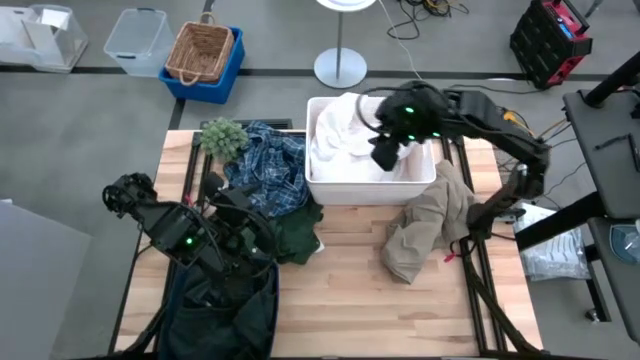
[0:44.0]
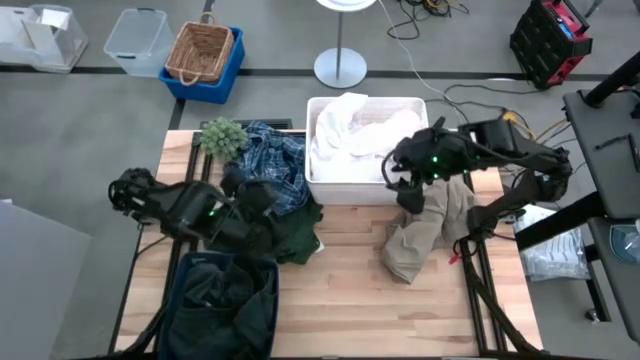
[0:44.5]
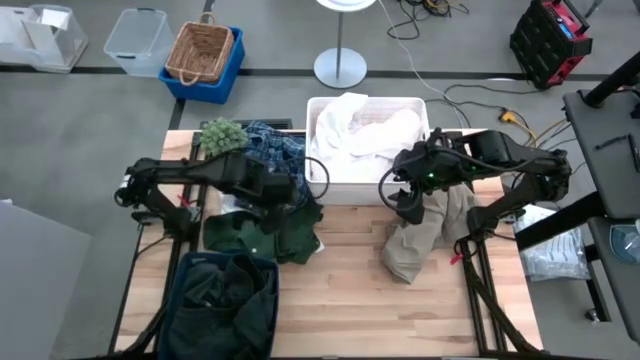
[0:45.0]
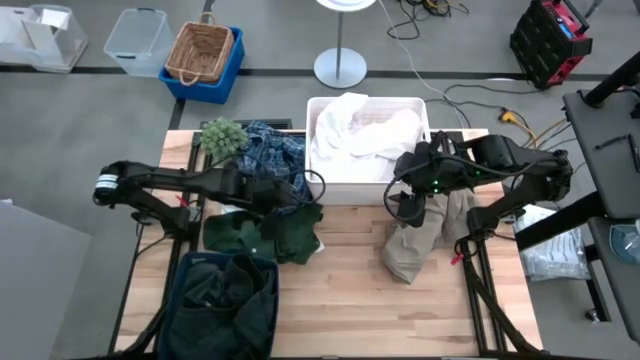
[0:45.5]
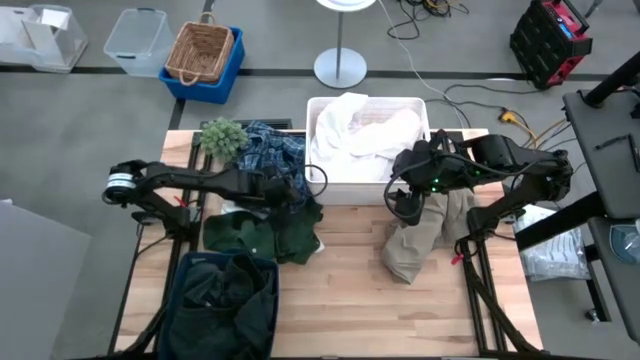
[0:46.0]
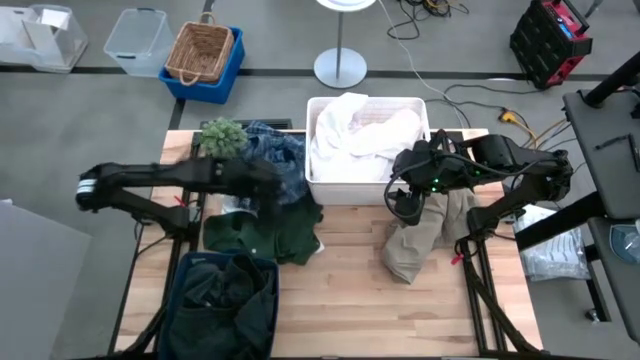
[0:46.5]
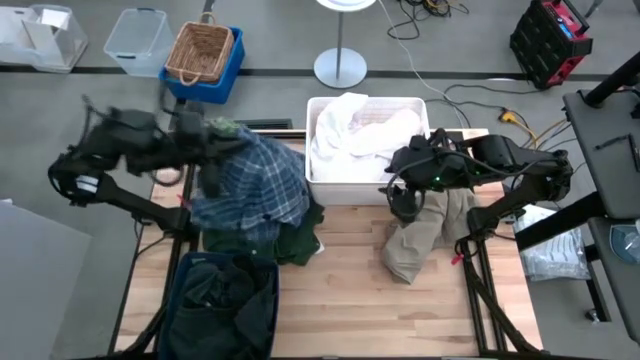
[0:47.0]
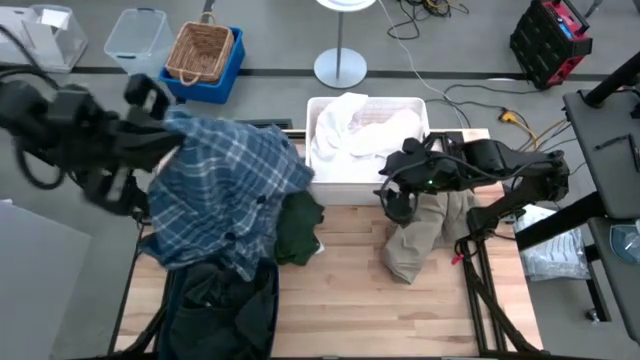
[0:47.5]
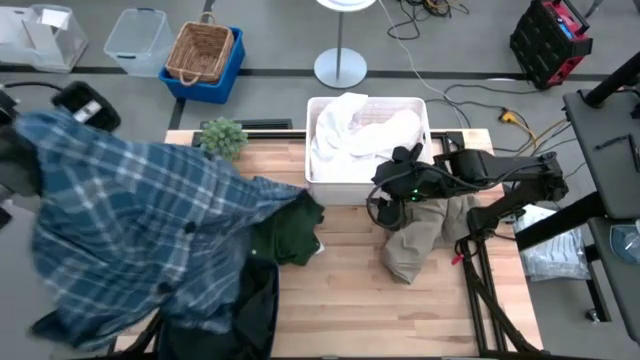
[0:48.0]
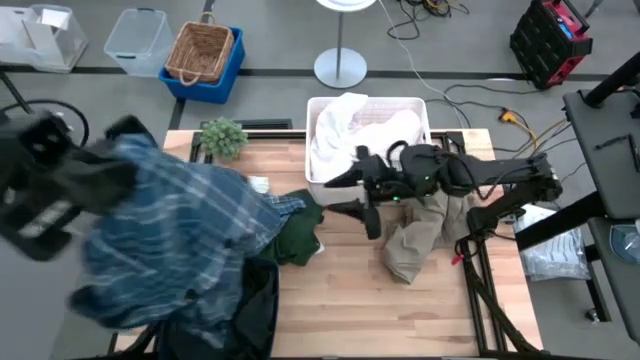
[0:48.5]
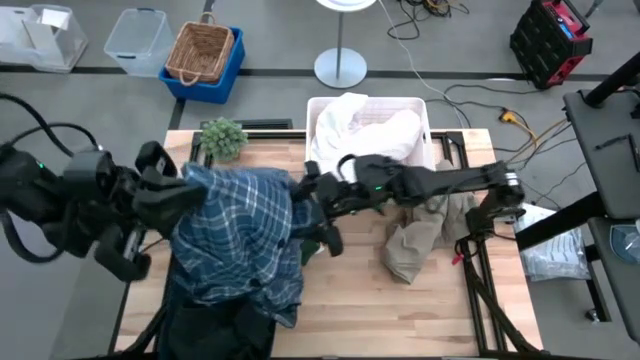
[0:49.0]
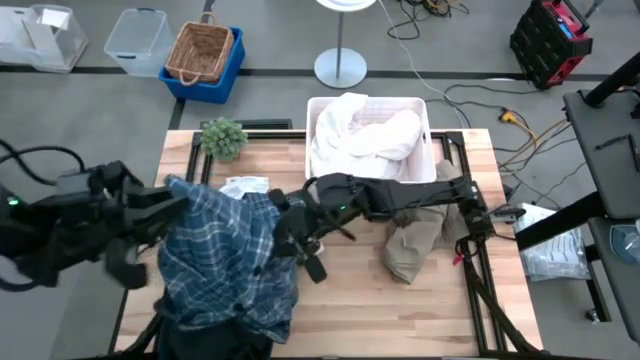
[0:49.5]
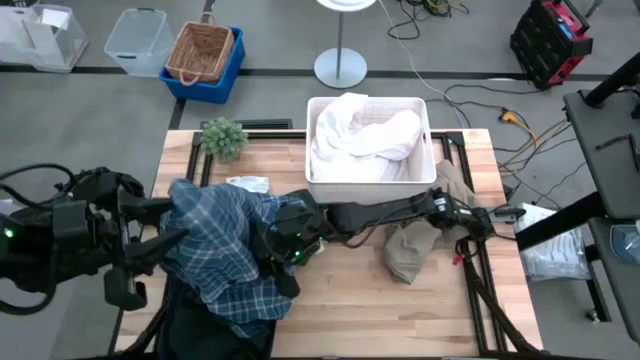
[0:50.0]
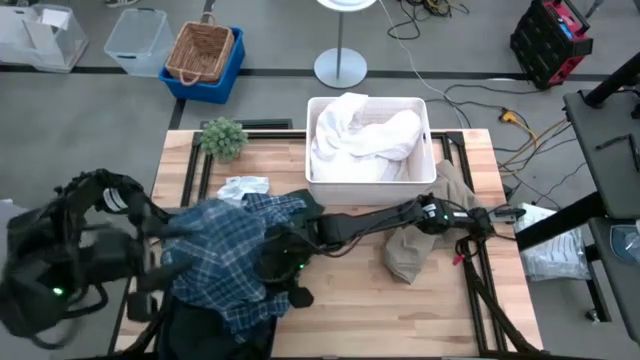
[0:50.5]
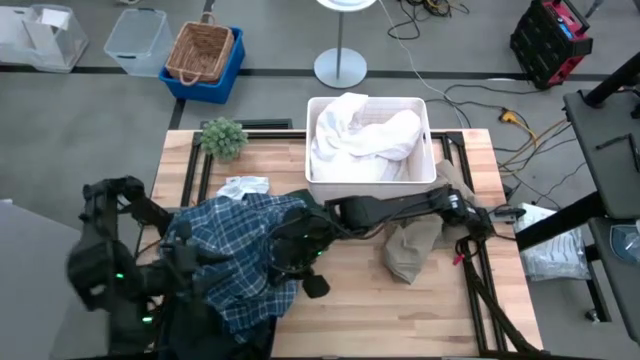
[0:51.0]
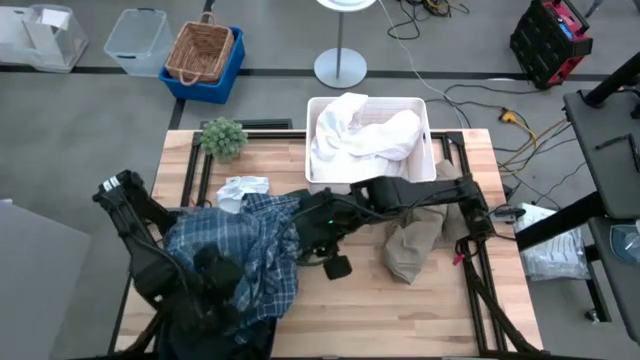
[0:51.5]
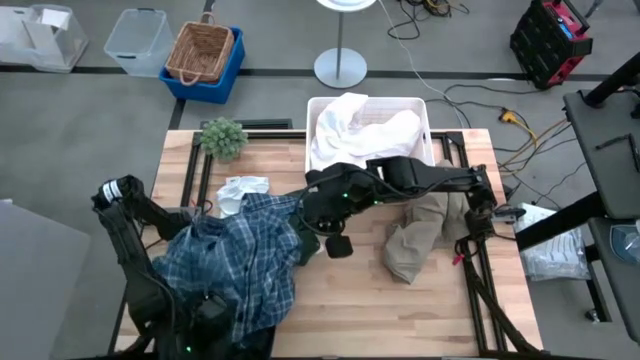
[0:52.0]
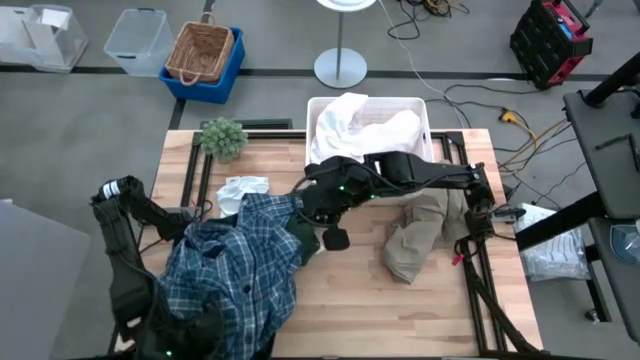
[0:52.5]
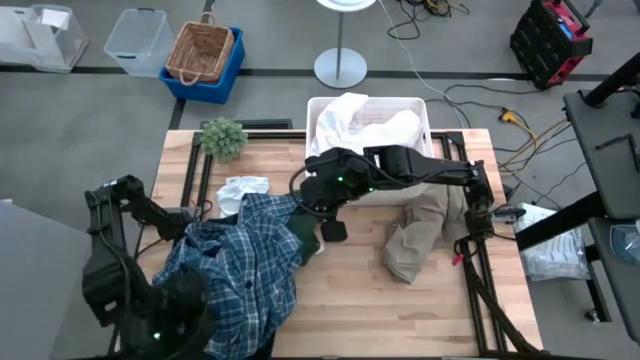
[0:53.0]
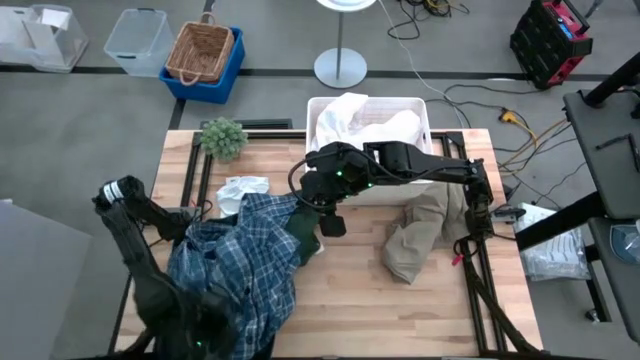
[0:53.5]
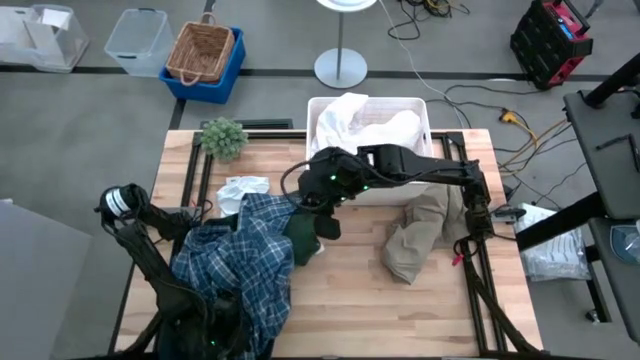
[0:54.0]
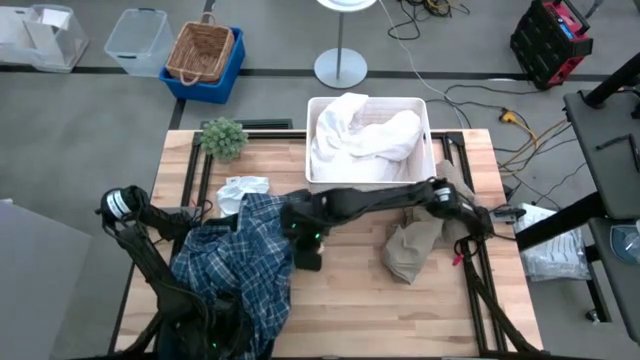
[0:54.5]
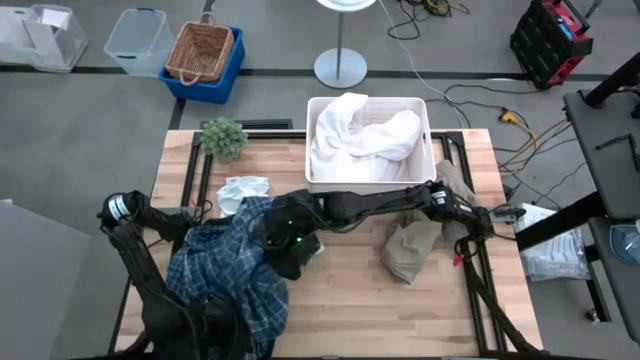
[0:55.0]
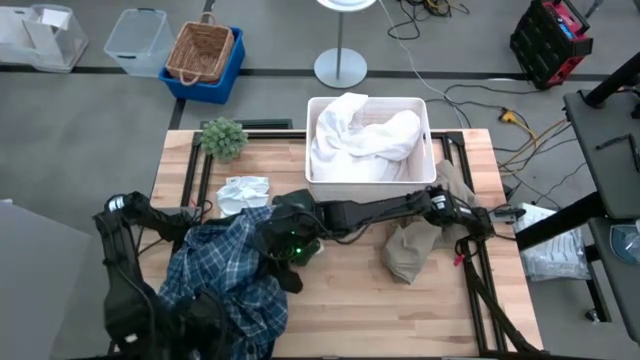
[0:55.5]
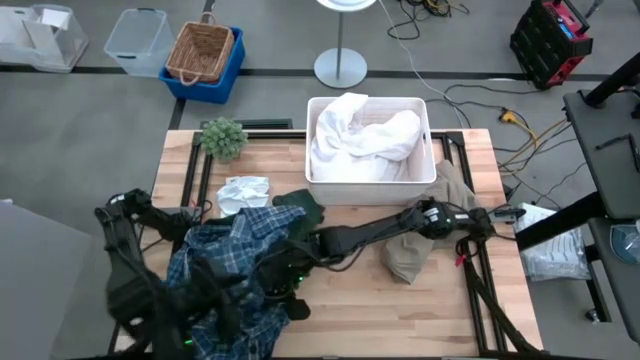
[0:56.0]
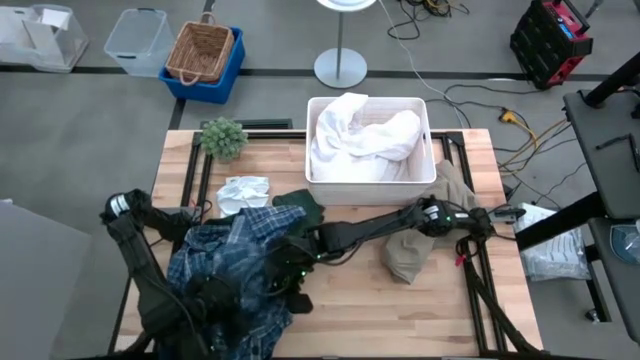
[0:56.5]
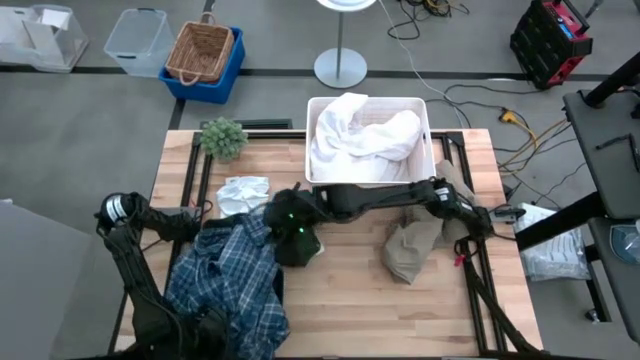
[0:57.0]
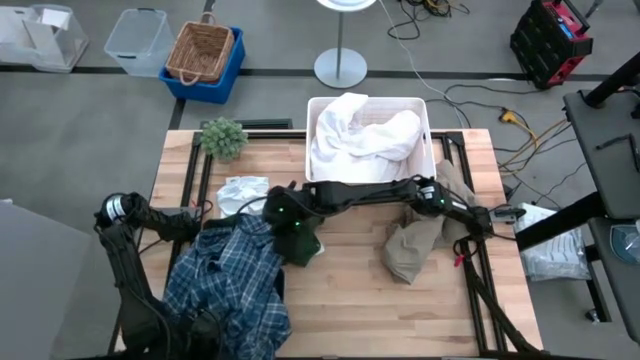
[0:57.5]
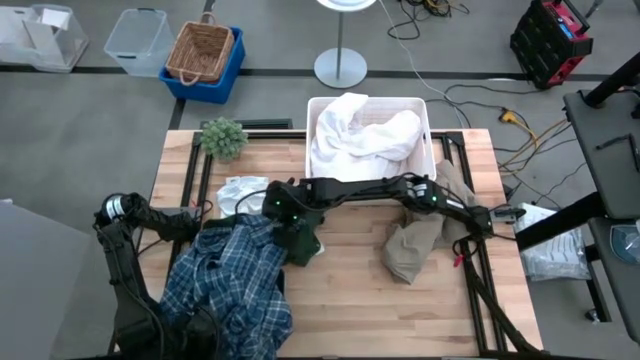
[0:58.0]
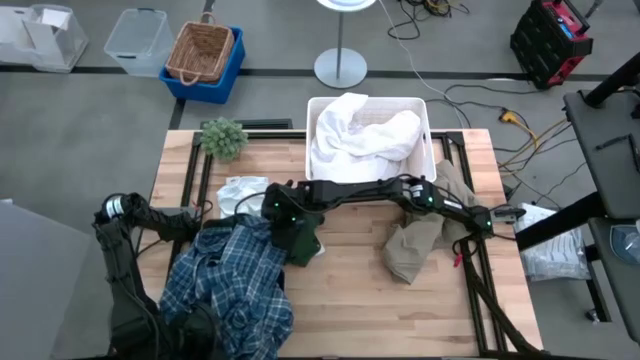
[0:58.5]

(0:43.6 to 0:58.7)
Task: Sort clothes
Put the blue shirt in the blue bin

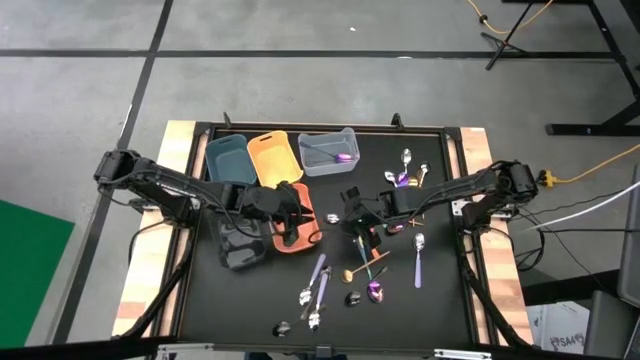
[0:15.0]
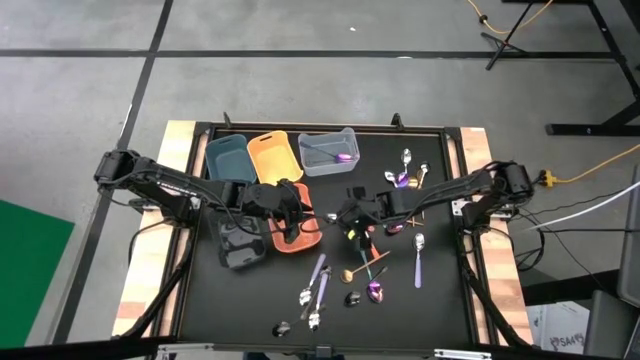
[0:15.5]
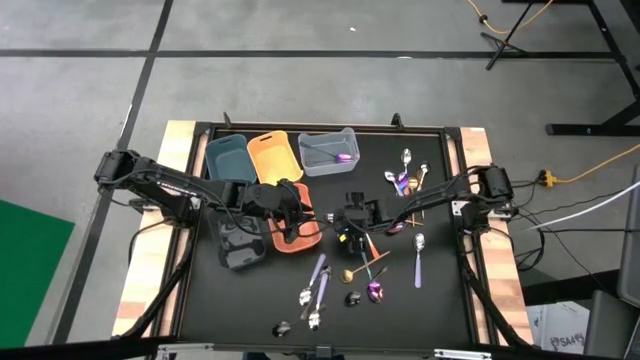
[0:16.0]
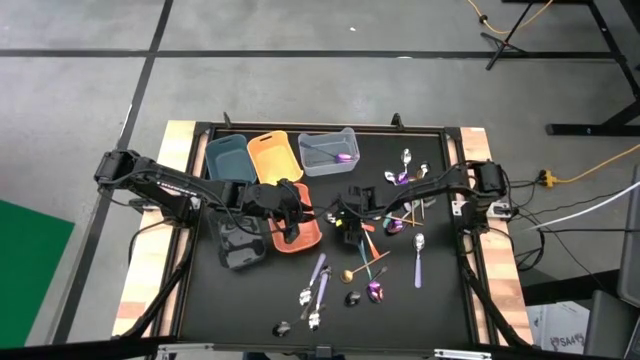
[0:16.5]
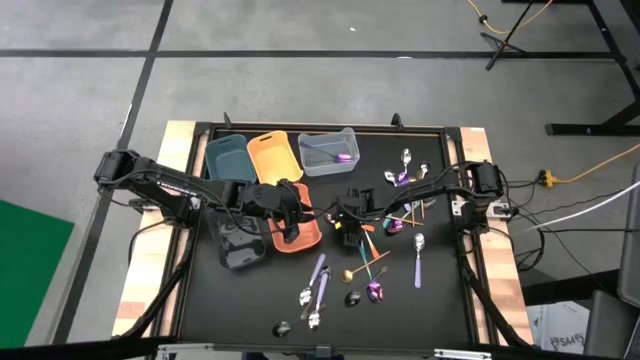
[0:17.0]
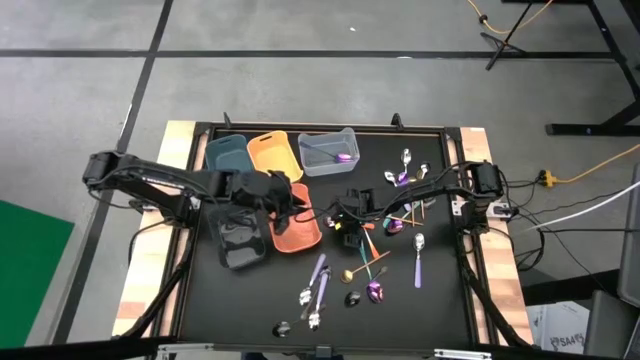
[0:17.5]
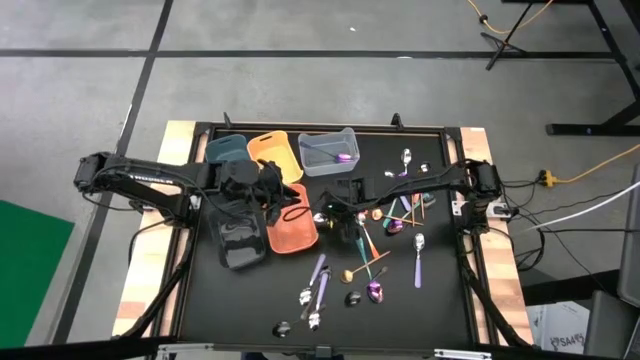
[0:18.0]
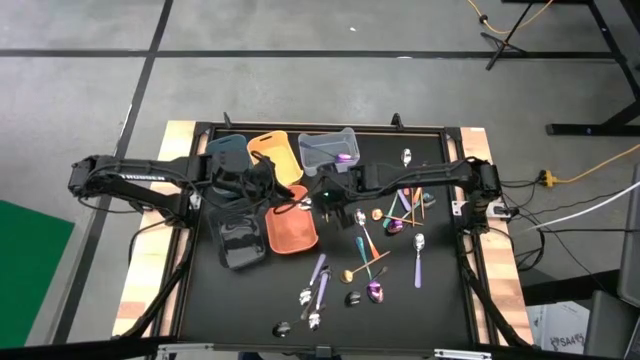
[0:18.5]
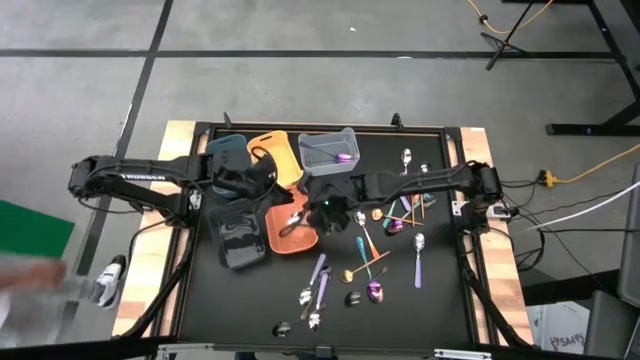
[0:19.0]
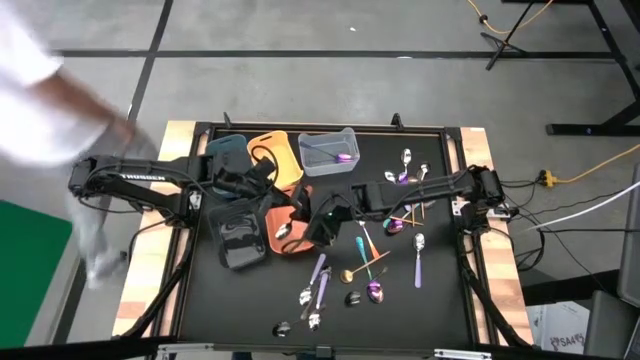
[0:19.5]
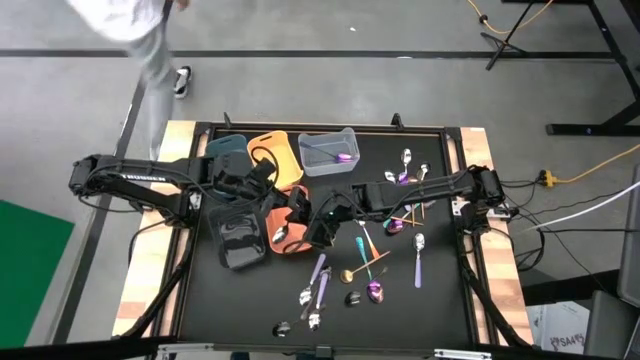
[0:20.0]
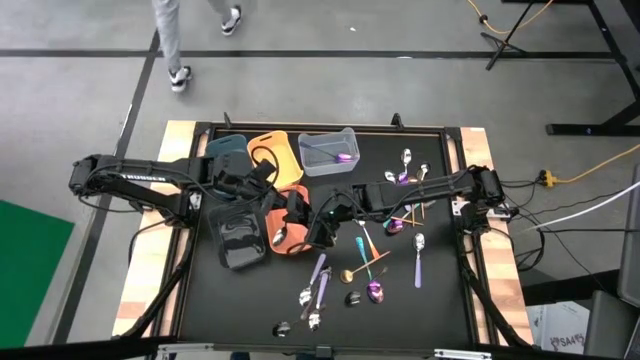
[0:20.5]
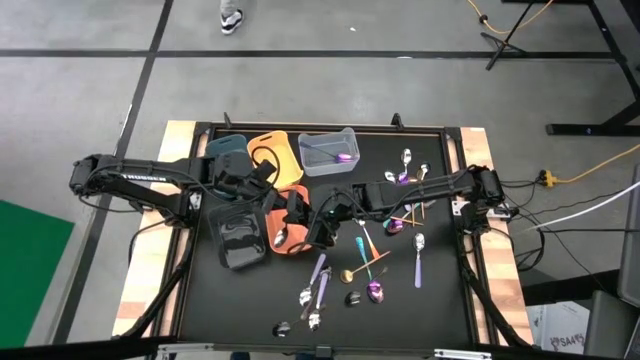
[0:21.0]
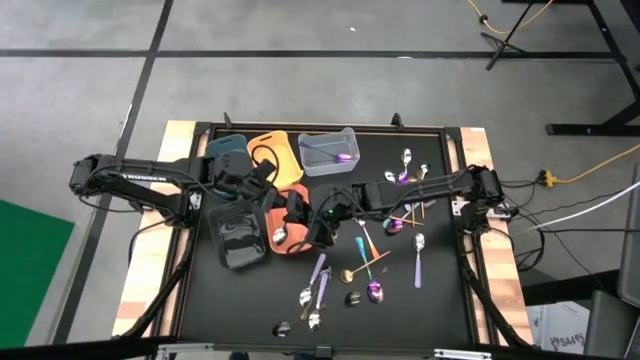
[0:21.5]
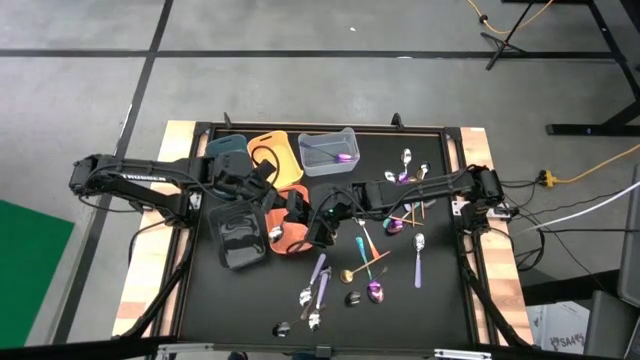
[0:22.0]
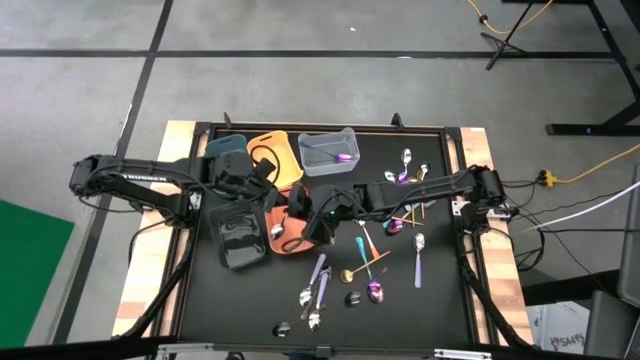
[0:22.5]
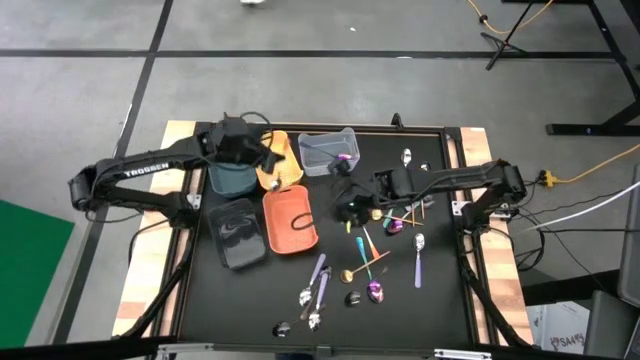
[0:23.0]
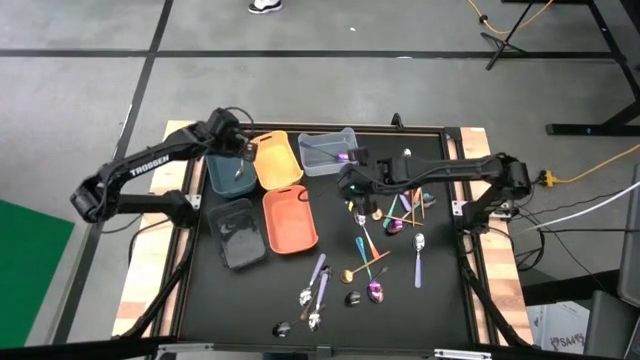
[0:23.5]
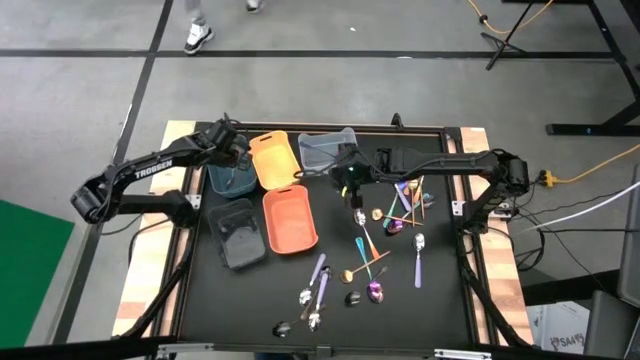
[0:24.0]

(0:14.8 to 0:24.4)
Task: Sort silverware by color (type)
Put the orange spoon into the blue bin
